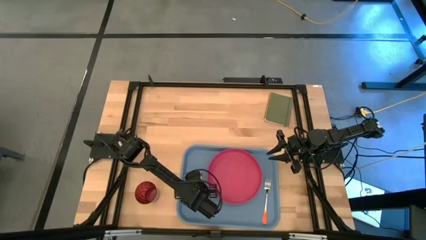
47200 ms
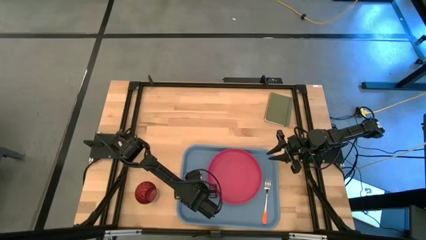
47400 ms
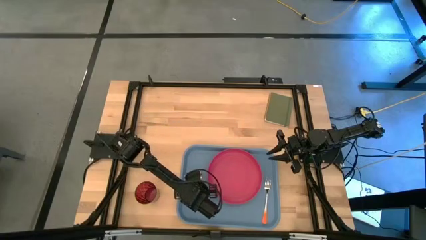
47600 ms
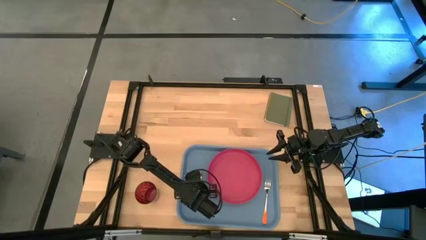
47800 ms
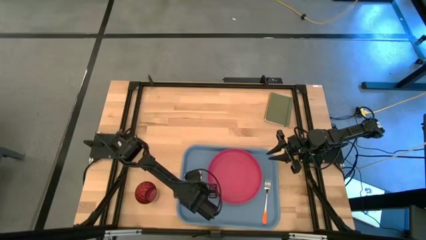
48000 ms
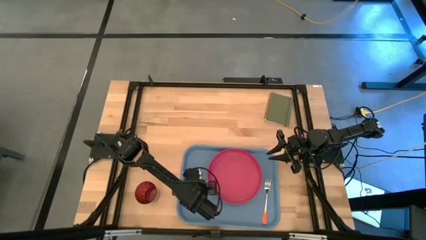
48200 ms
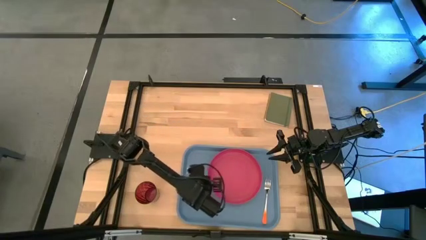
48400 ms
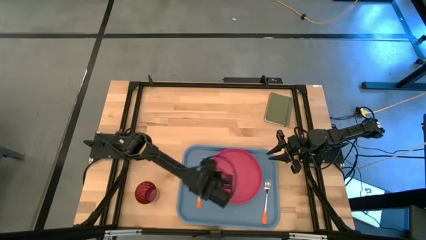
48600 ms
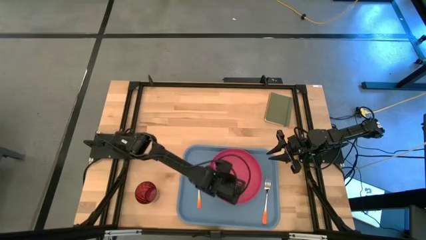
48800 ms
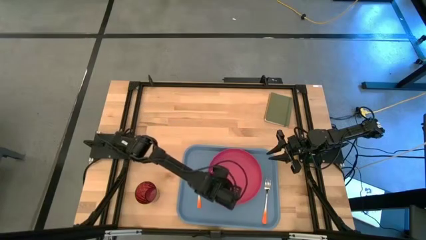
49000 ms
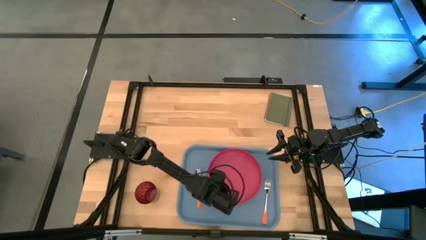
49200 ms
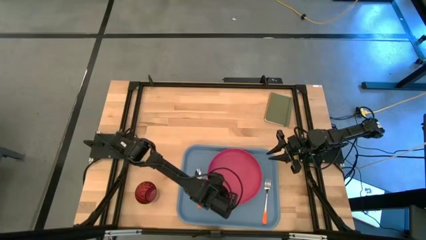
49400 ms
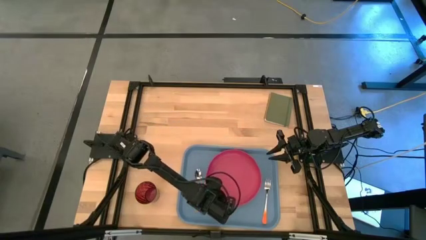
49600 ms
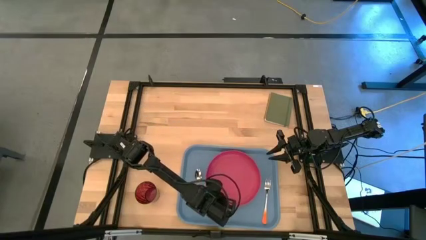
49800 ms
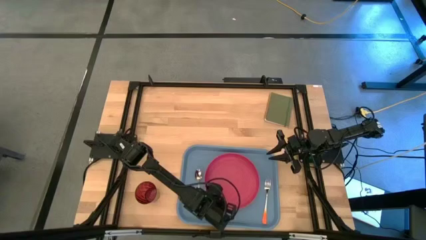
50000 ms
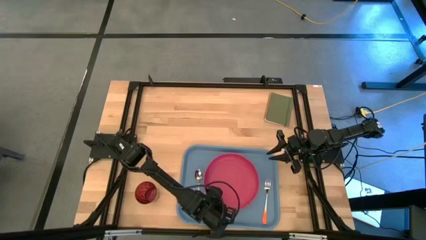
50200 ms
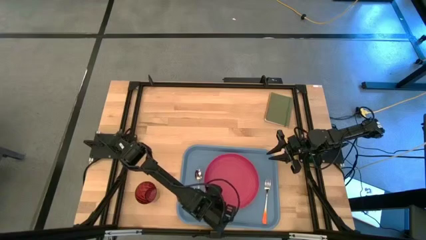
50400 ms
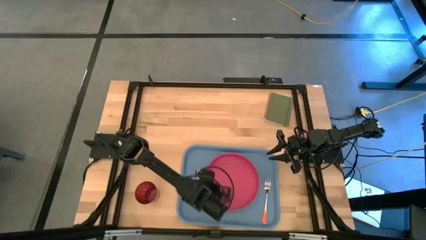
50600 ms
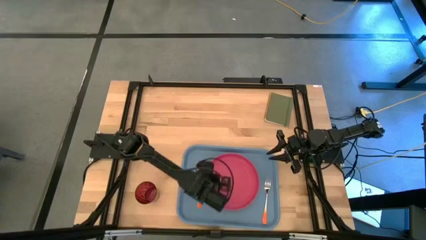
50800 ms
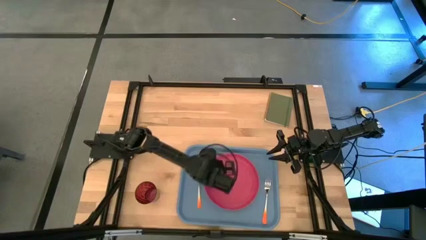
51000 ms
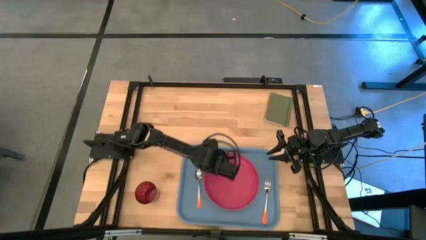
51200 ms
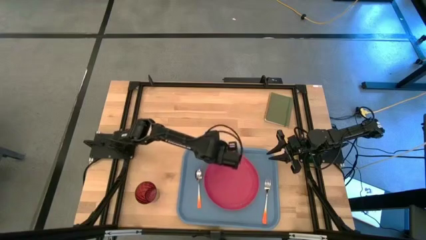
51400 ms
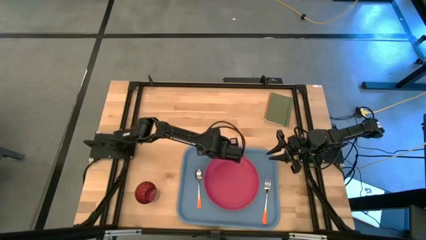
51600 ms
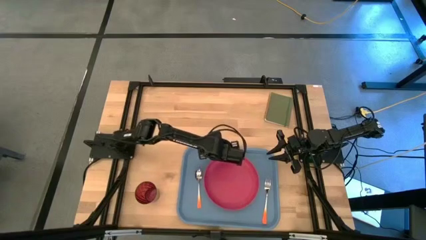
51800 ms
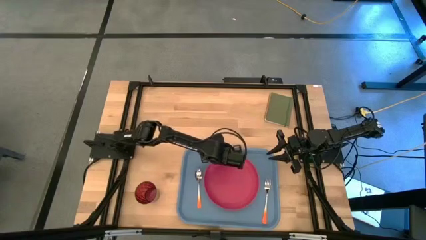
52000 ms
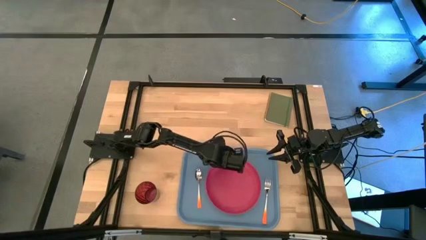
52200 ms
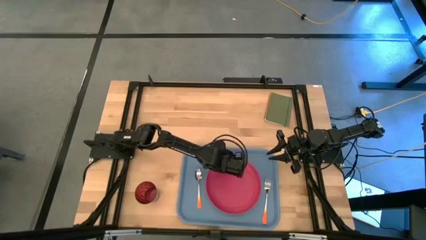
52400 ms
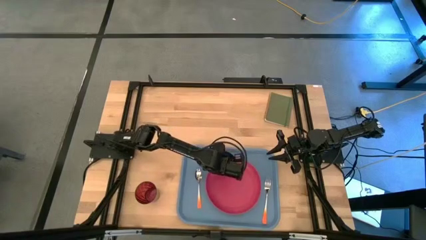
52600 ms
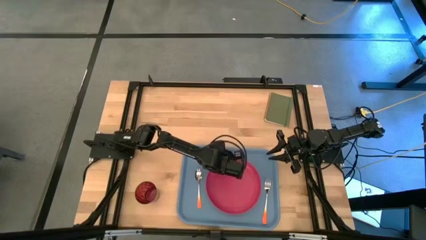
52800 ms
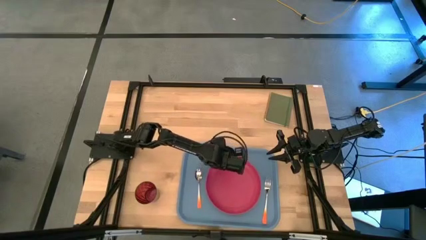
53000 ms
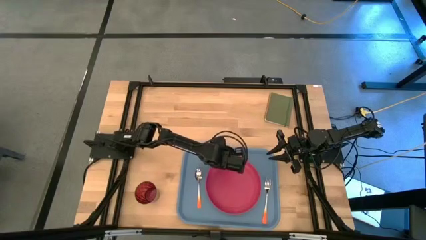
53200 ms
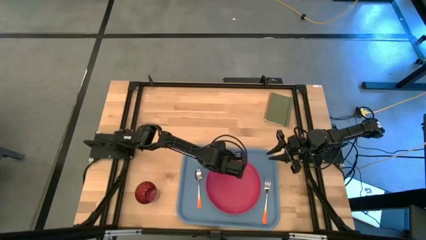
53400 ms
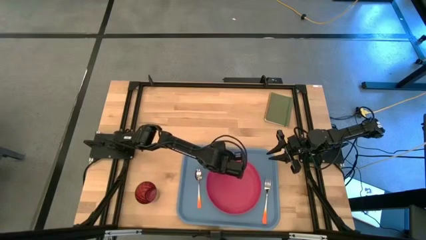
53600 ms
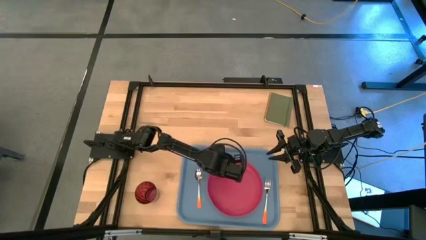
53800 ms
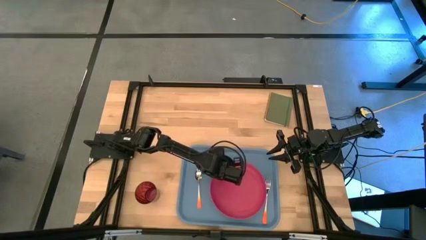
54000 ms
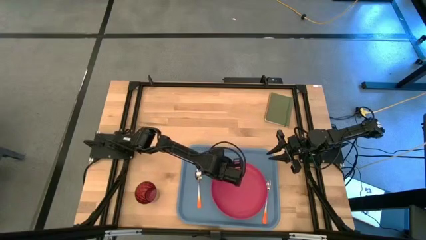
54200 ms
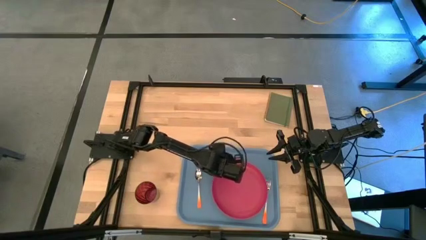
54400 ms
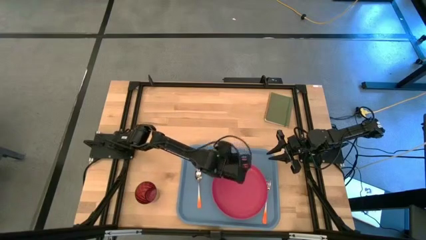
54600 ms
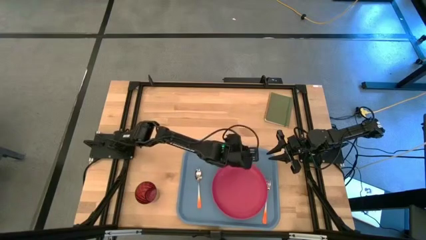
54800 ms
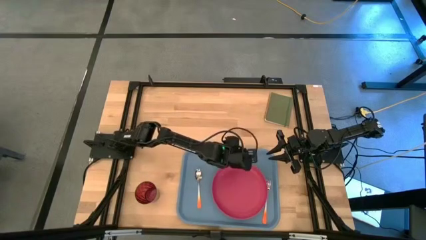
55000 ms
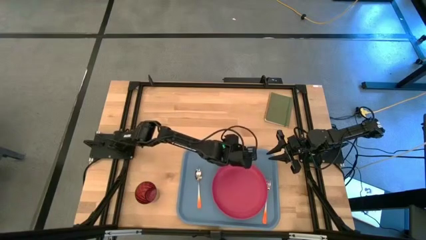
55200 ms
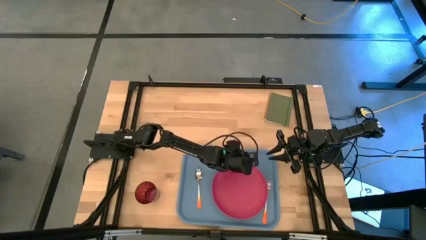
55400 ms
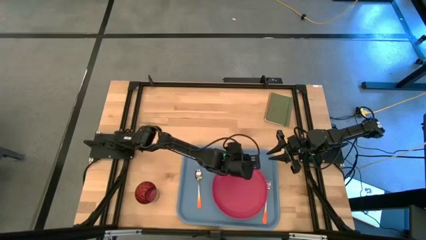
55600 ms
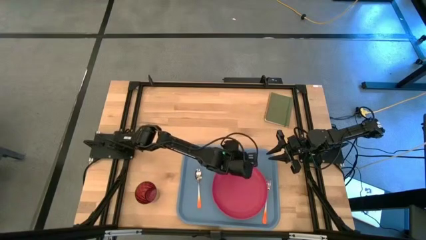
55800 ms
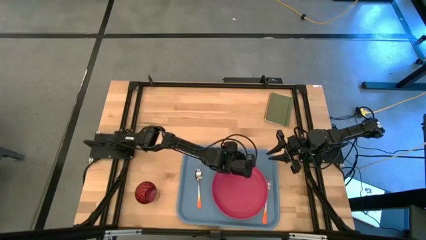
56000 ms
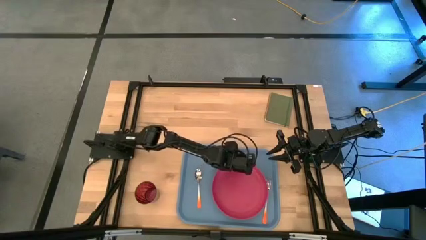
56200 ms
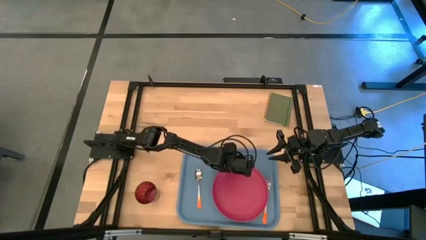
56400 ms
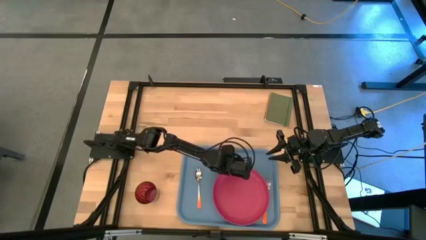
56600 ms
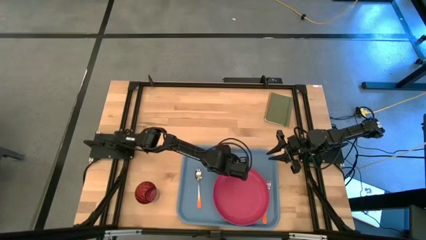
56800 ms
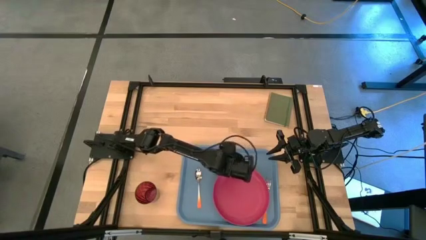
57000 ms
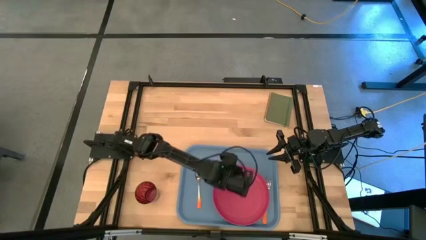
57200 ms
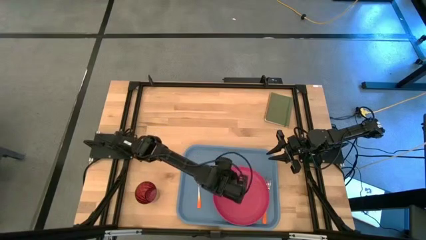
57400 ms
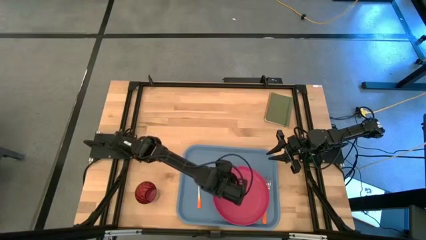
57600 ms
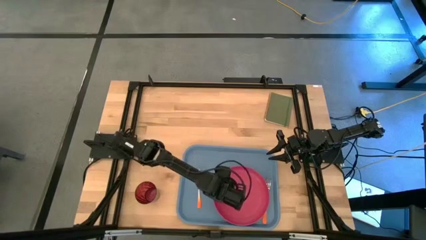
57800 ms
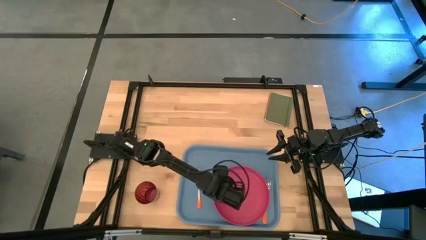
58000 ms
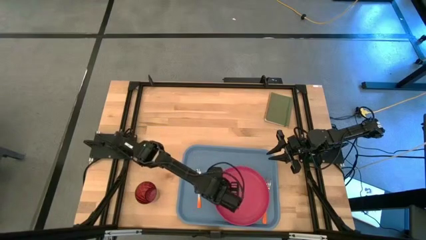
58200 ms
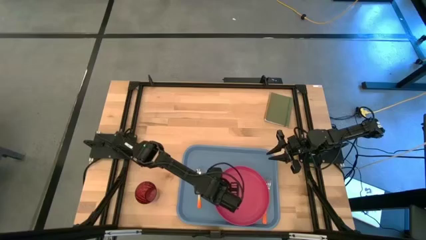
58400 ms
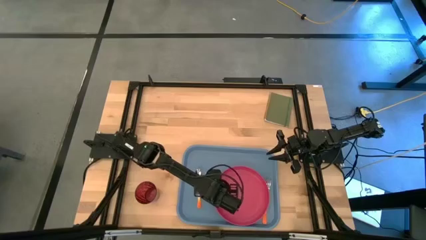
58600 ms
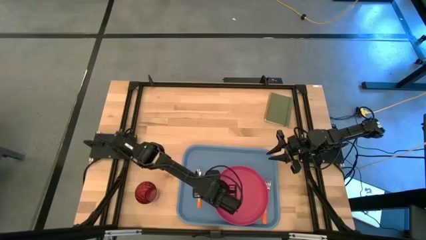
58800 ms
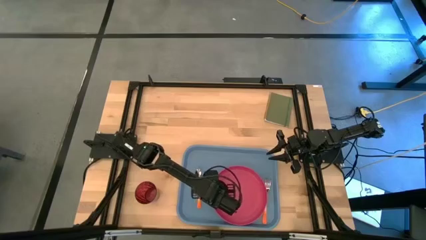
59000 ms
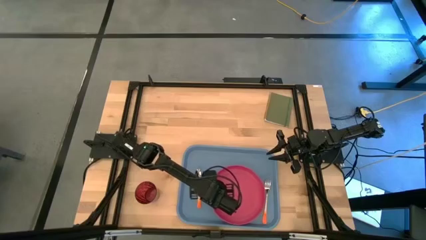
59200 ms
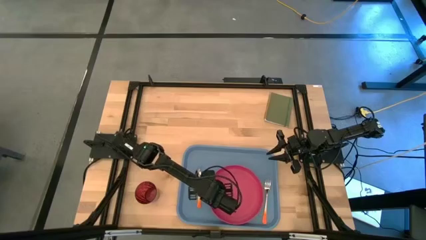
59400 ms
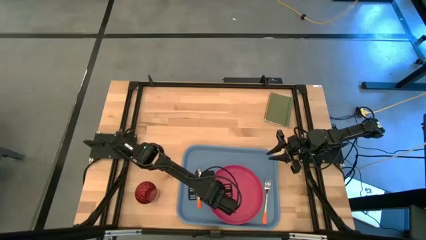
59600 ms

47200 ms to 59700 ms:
Task: Pick and place plate/cup/fork/spoon on tray
Adjust the pink plate on the blue serving tray

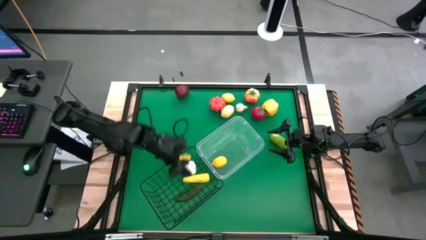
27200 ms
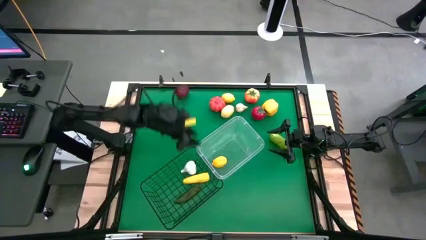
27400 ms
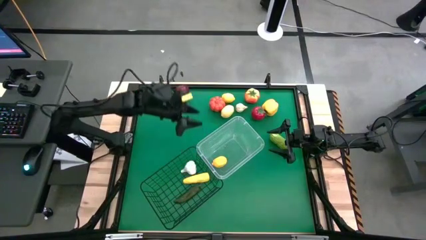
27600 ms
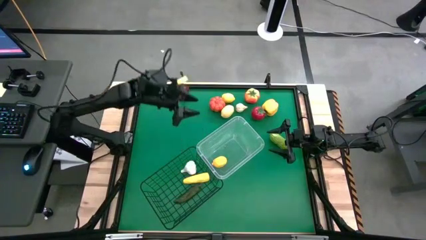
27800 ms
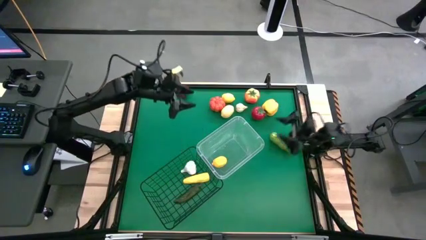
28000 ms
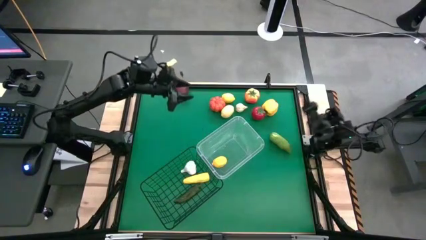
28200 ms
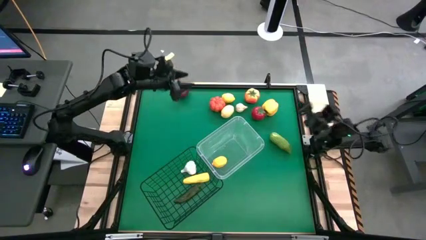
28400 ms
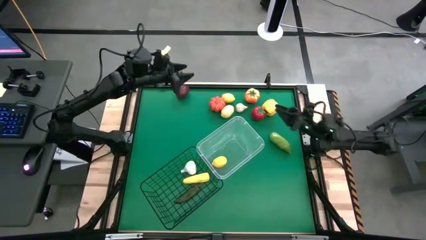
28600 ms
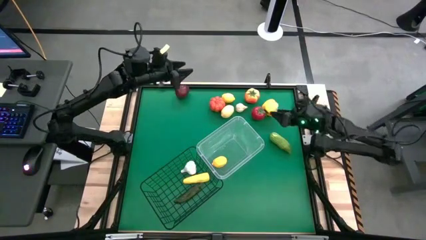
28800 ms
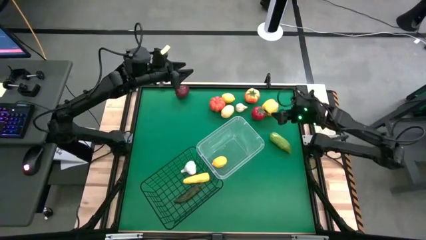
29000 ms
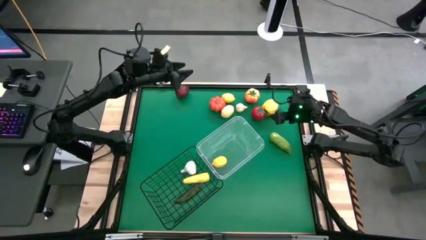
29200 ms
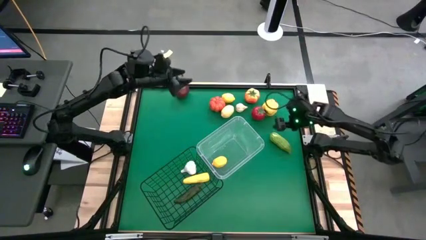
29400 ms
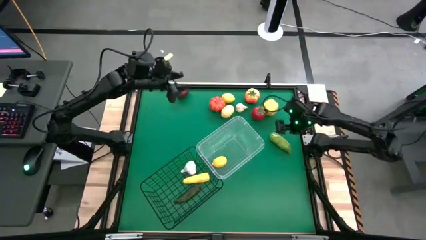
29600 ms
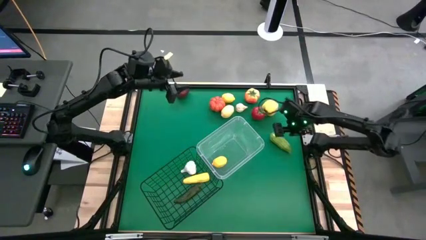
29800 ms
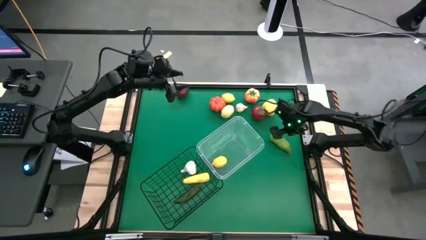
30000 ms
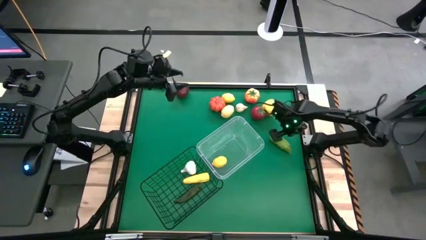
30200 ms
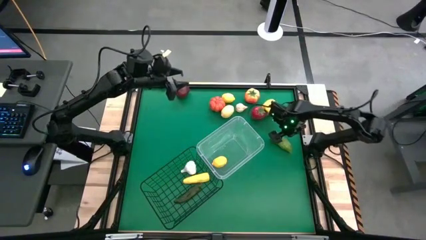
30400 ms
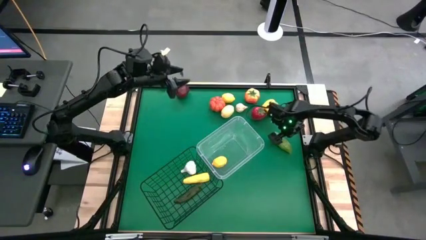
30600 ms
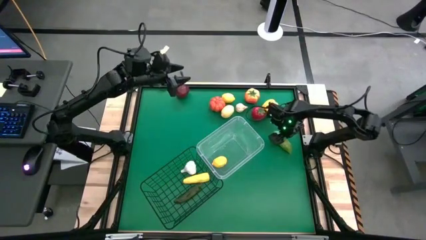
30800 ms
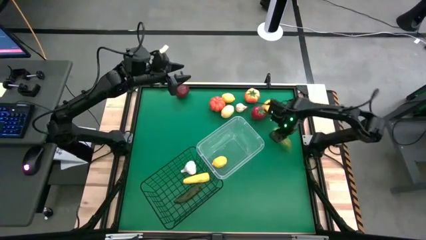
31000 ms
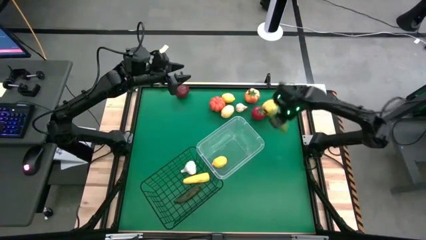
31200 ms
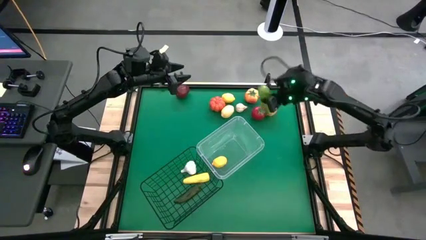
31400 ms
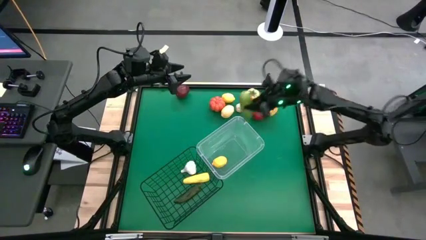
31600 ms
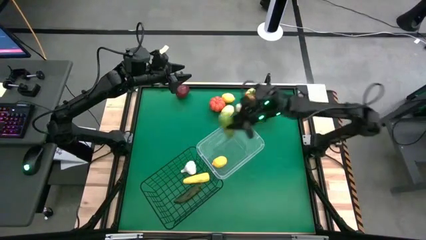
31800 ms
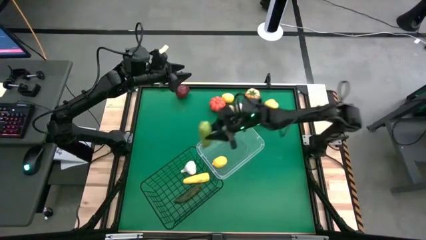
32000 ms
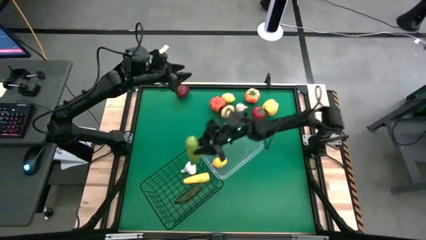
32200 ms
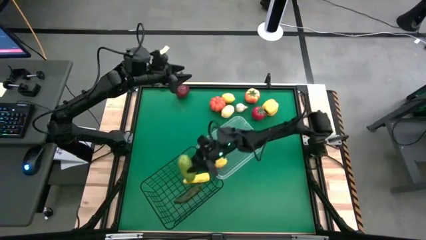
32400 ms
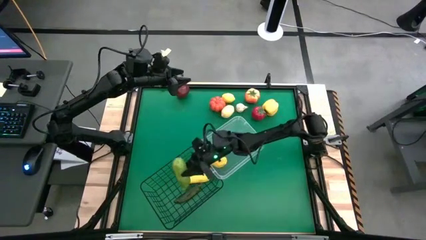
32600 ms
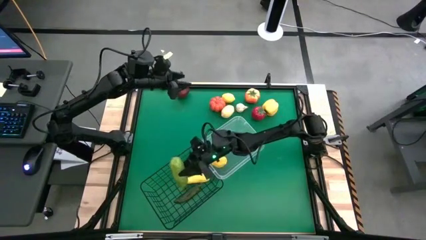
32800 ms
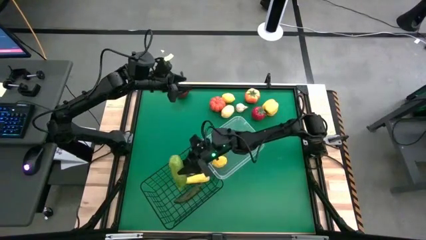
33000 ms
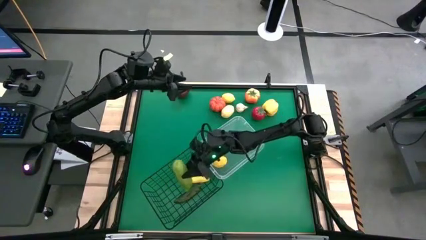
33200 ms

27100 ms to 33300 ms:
Task: Sort produce into baskets
Put the cucumber into the wire basket
